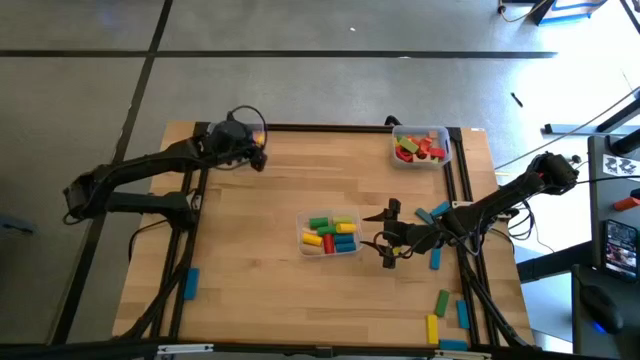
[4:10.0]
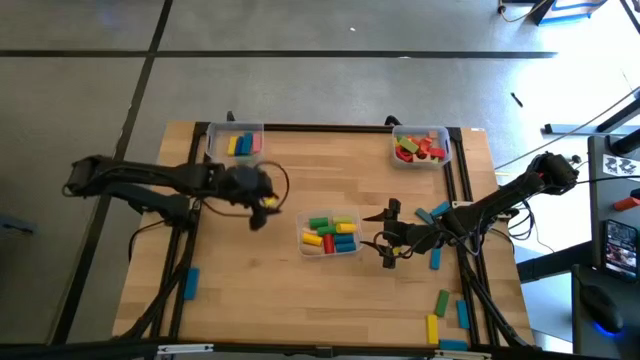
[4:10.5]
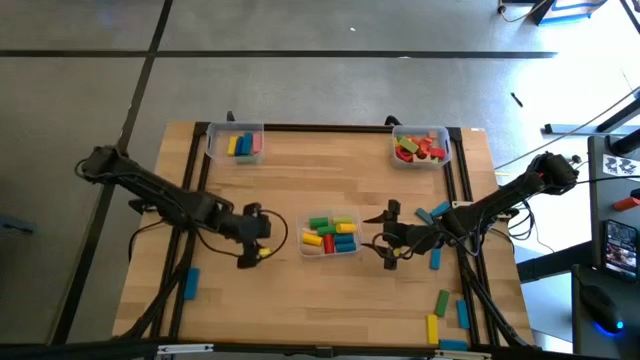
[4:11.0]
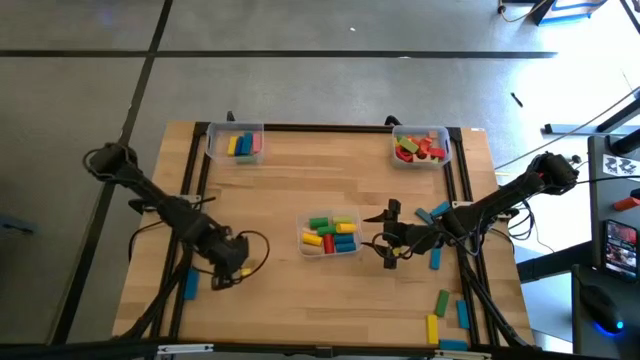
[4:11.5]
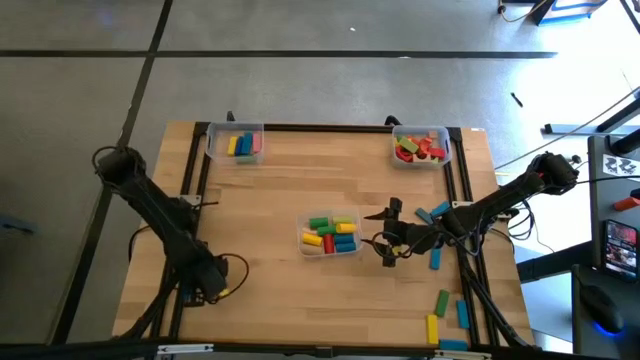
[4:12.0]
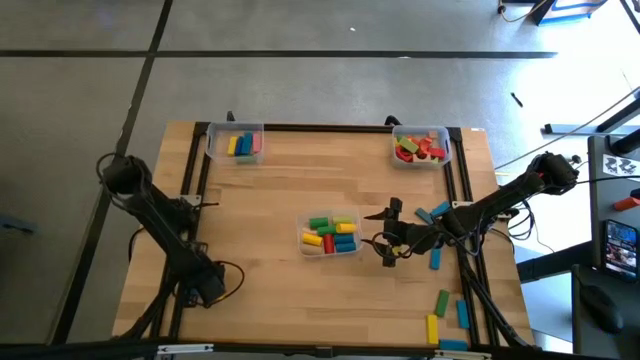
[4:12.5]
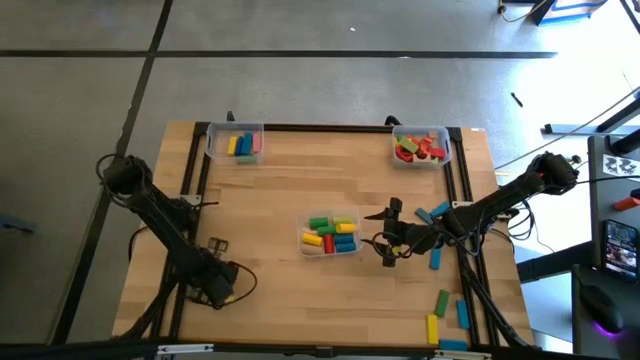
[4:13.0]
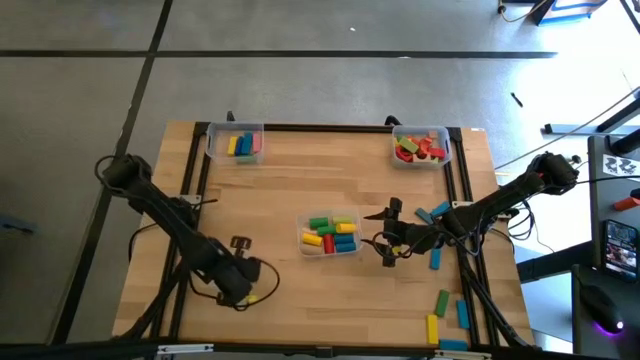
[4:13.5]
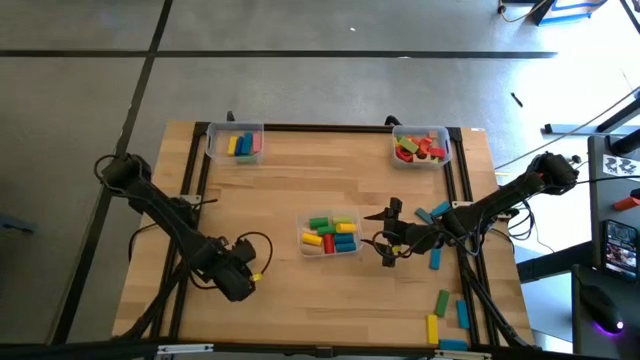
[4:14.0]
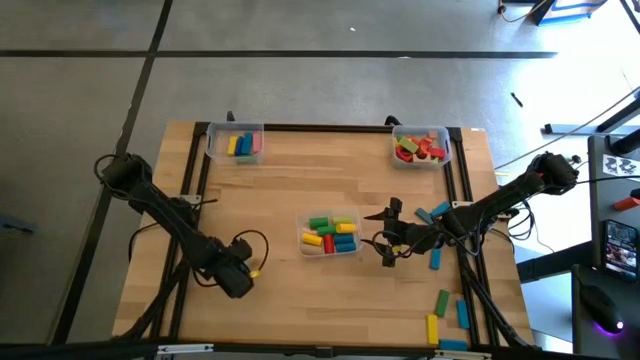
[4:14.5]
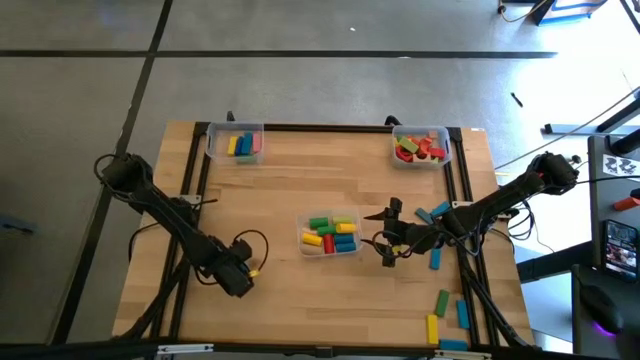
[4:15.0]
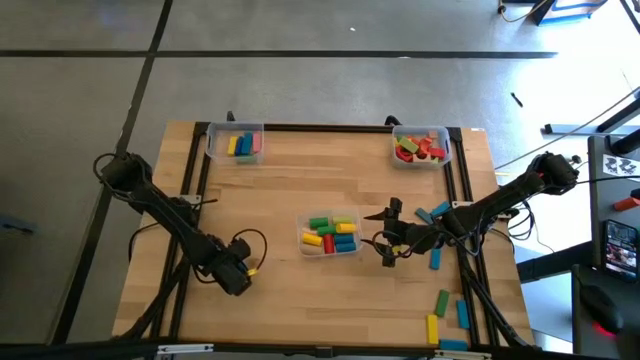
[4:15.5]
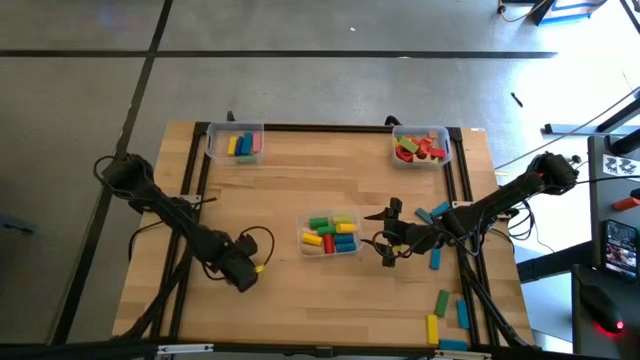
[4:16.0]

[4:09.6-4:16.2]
Task: Sort blocks by size
Put the blue rectangular block into the top left transparent bin

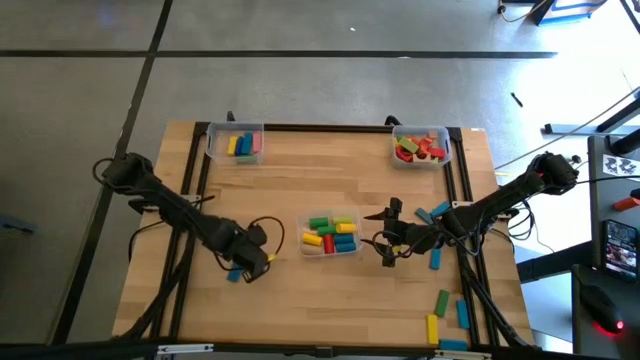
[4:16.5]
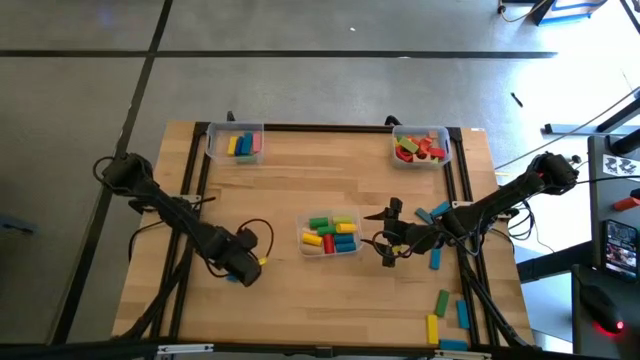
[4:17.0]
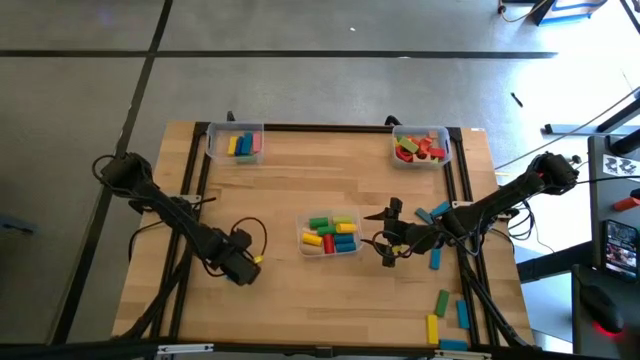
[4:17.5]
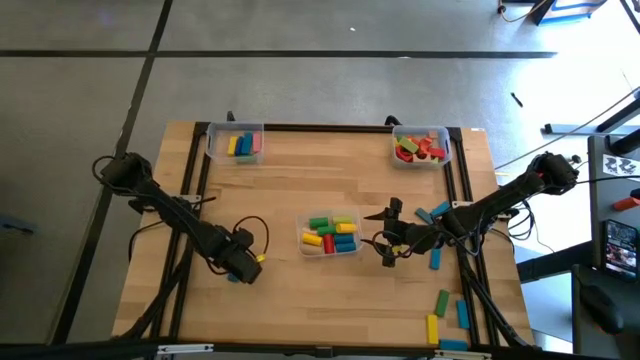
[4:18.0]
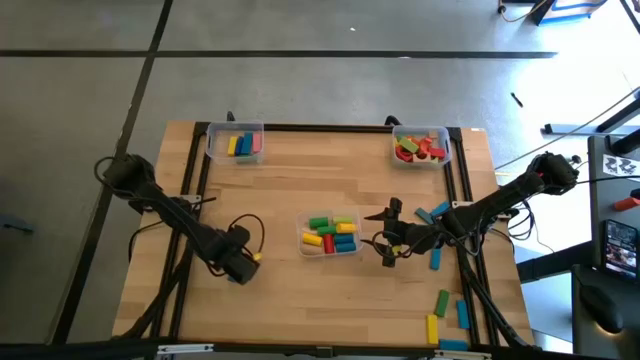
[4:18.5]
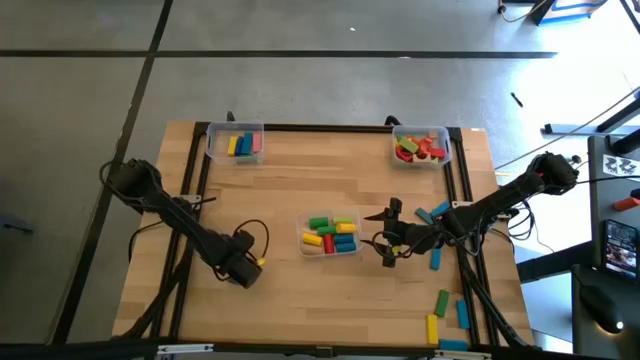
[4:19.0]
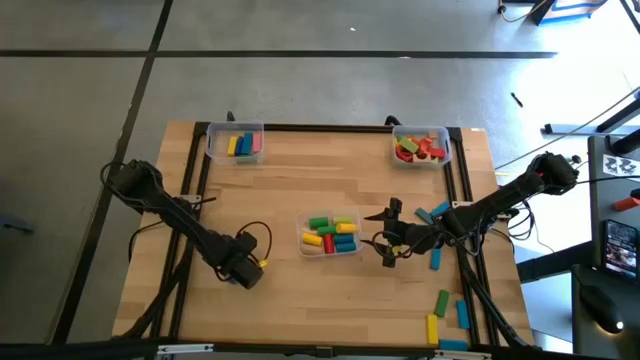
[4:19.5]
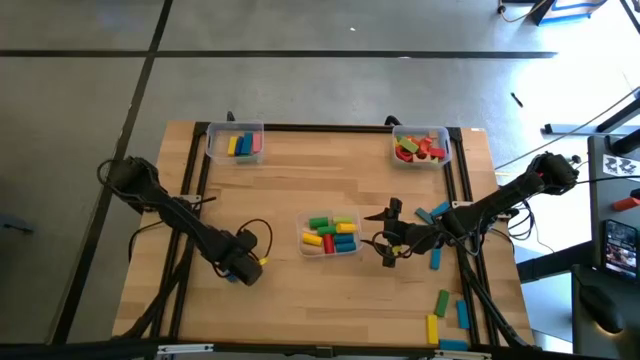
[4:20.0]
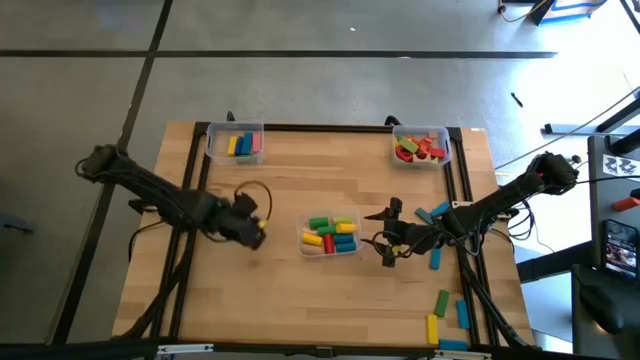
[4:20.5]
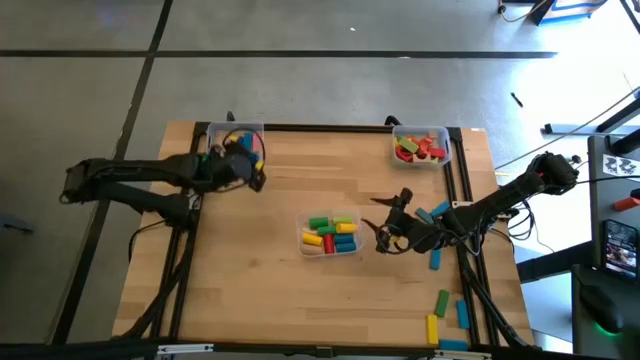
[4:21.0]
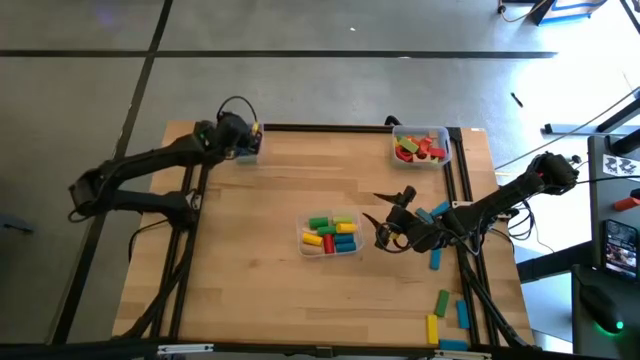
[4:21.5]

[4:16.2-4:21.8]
Put the blue rectangular block into the top left transparent bin

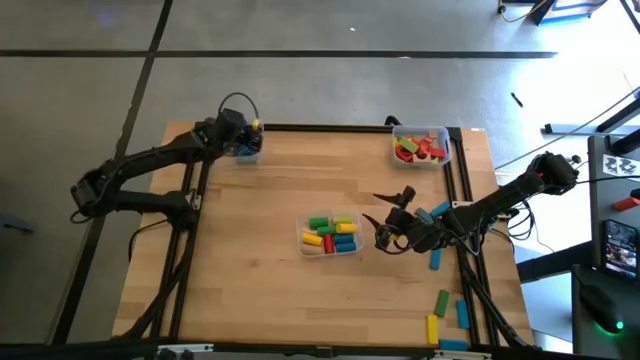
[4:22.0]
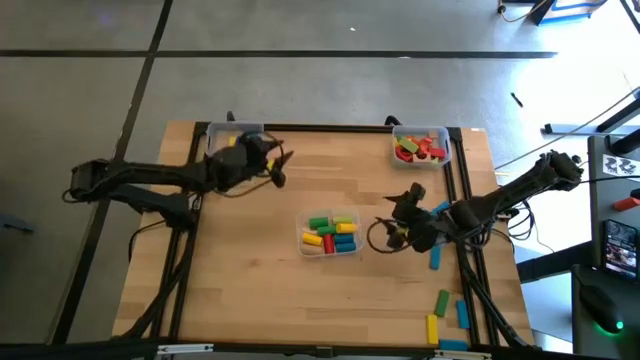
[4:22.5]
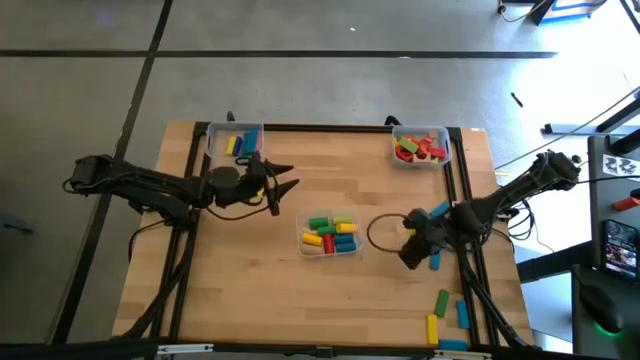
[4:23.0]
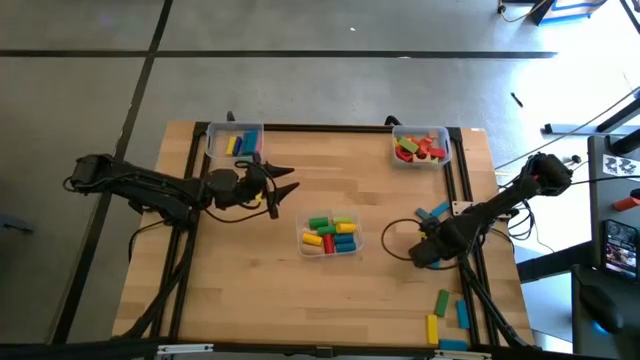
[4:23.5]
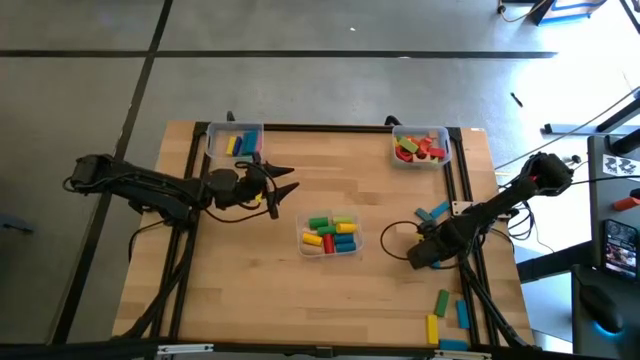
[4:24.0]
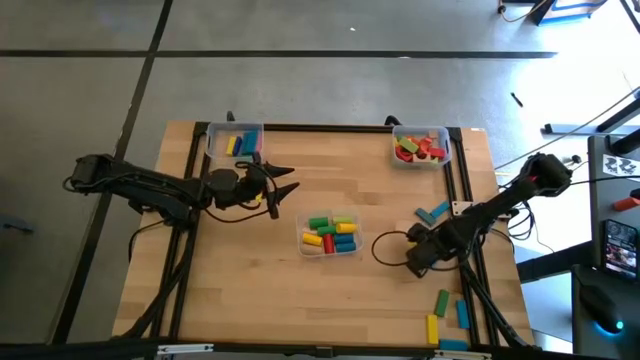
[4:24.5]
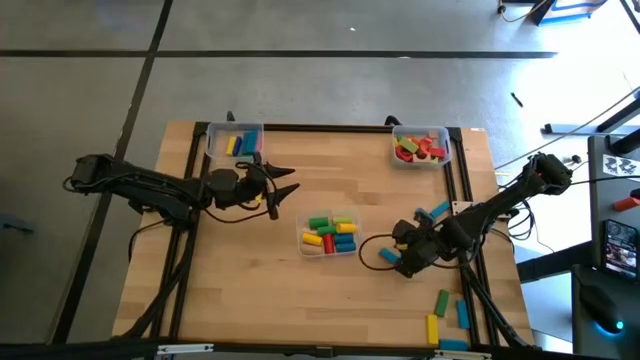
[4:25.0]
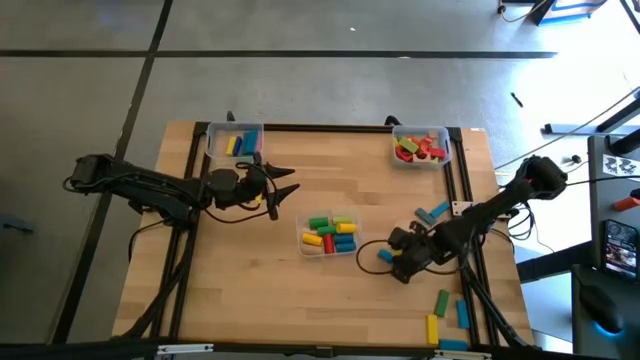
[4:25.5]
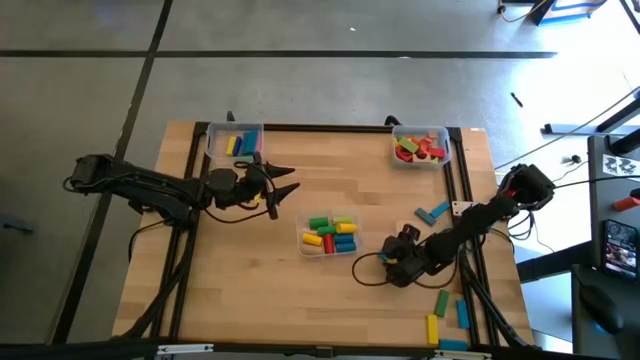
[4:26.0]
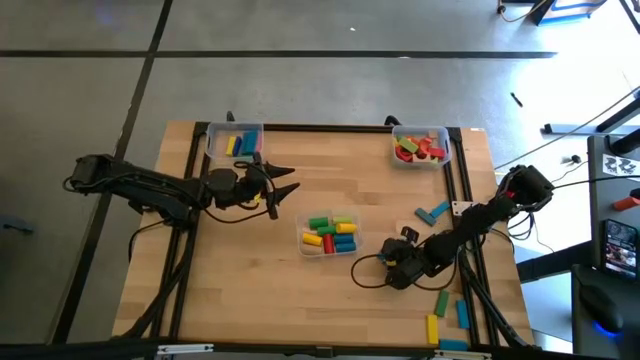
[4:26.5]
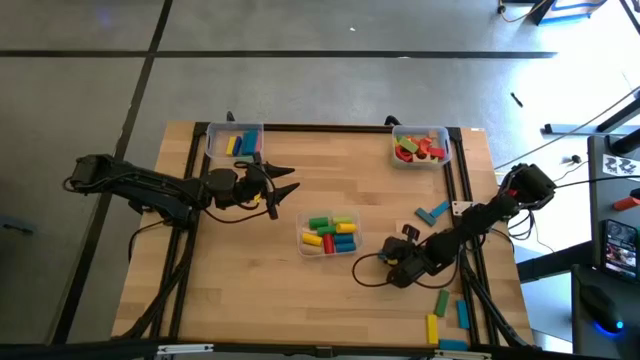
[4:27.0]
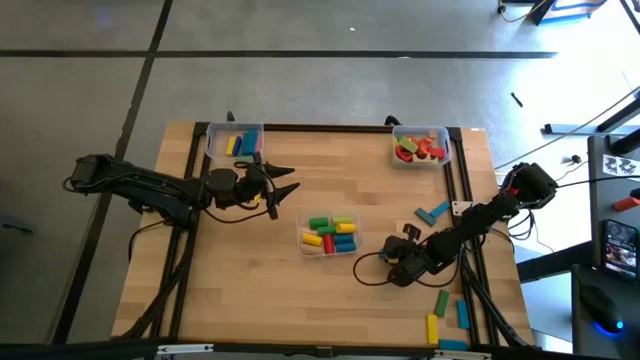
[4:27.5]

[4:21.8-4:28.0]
Put the blue rectangular block into the top left transparent bin

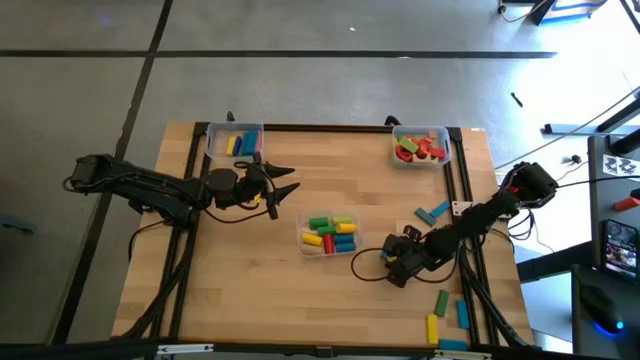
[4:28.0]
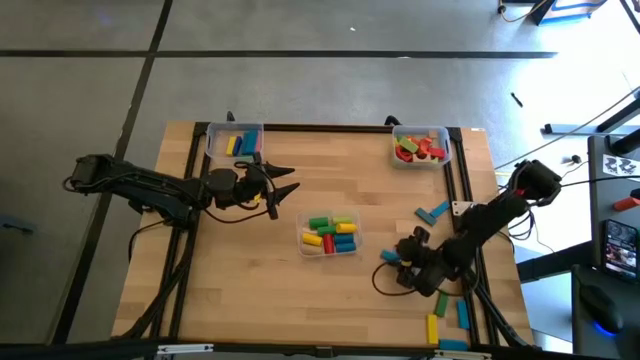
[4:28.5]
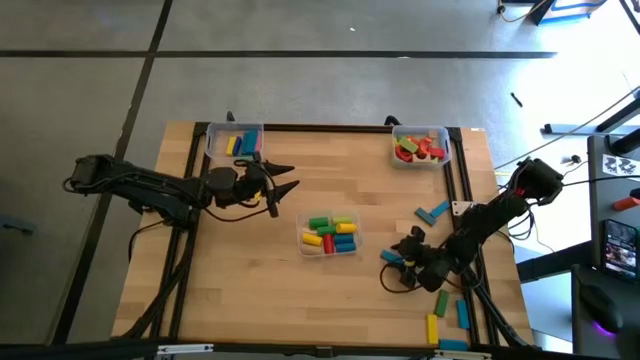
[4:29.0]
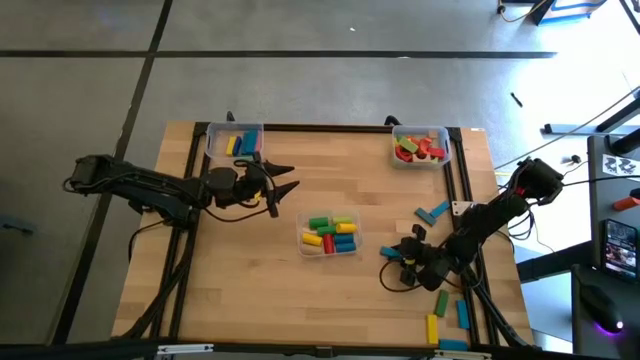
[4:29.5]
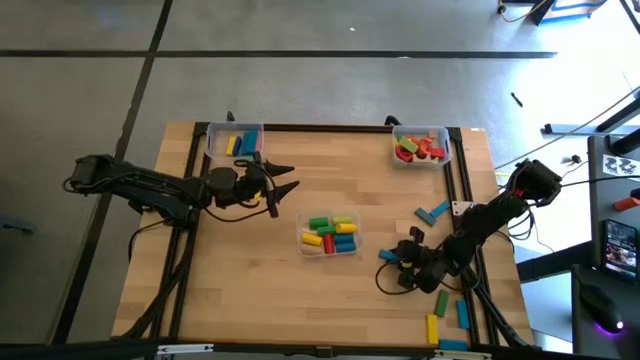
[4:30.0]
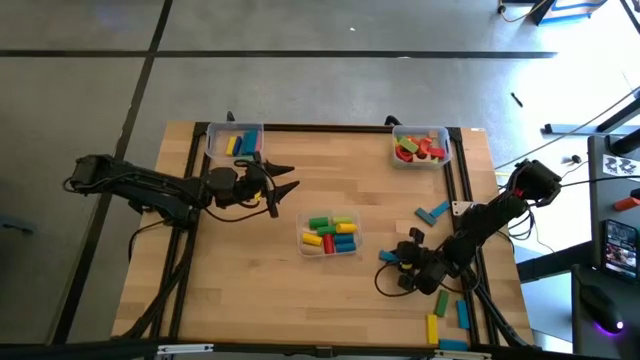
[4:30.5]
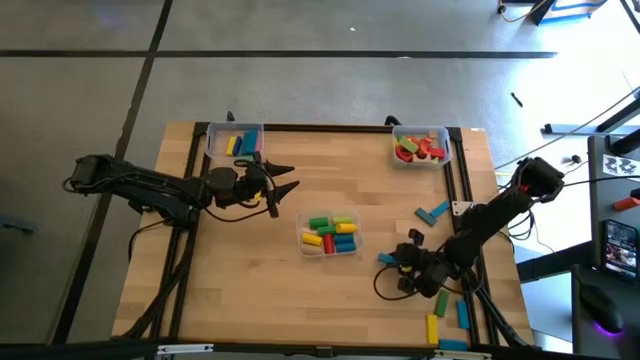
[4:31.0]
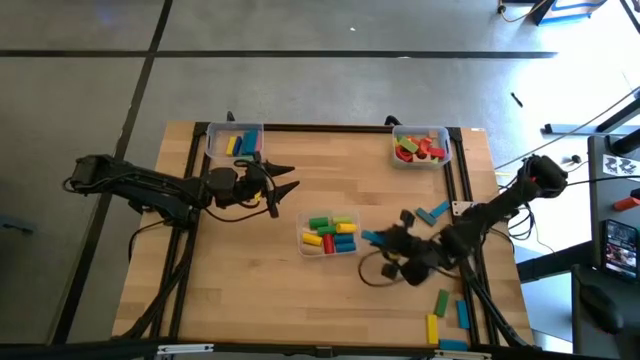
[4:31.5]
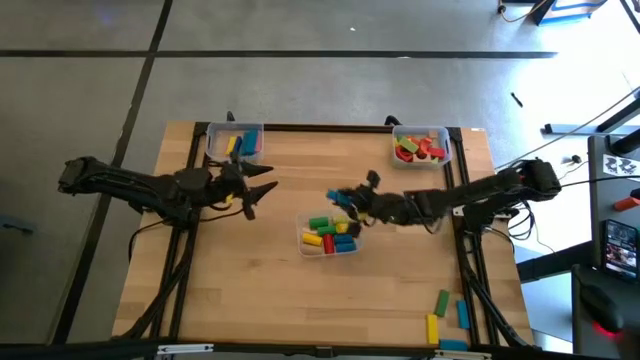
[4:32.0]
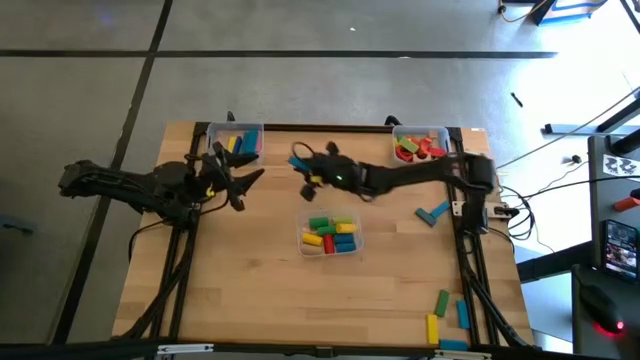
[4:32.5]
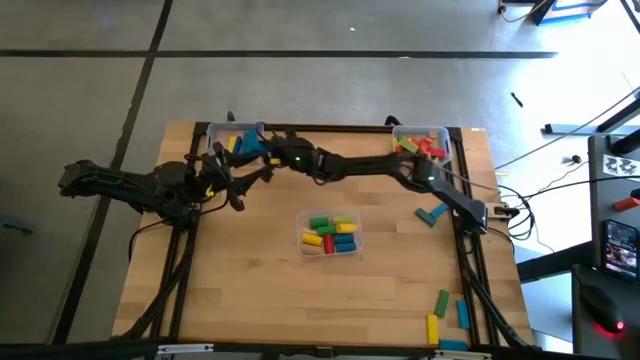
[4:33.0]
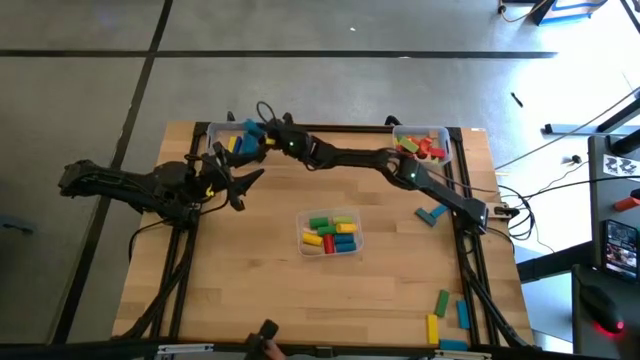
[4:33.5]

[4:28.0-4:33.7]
Put the blue rectangular block into the top left transparent bin
